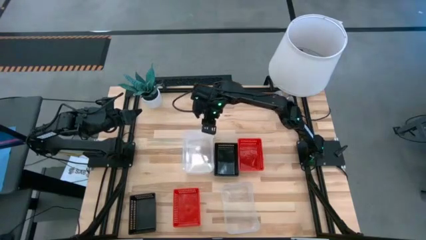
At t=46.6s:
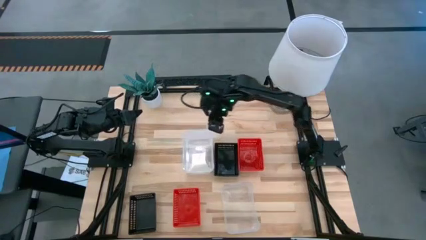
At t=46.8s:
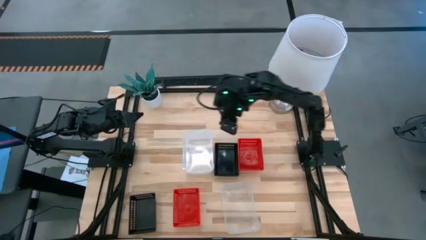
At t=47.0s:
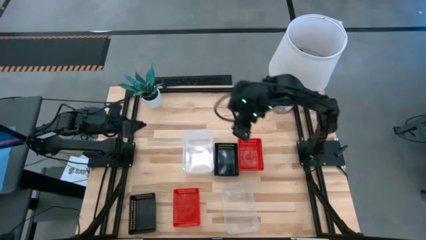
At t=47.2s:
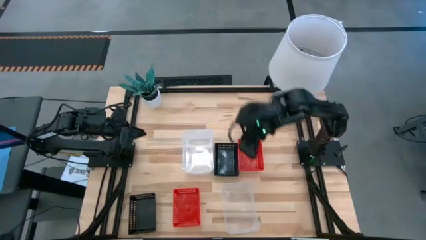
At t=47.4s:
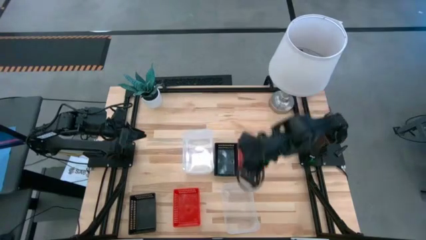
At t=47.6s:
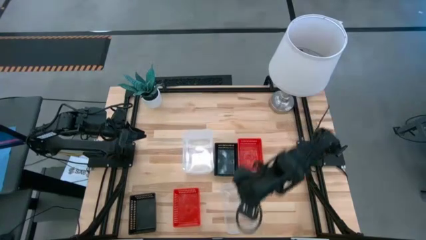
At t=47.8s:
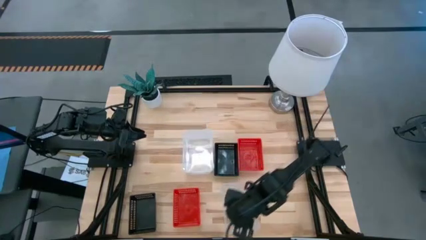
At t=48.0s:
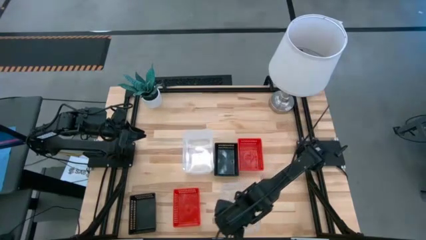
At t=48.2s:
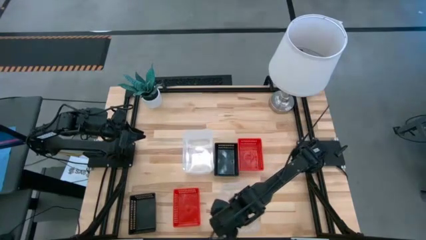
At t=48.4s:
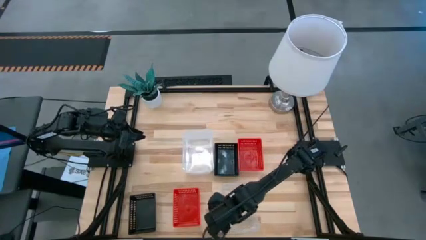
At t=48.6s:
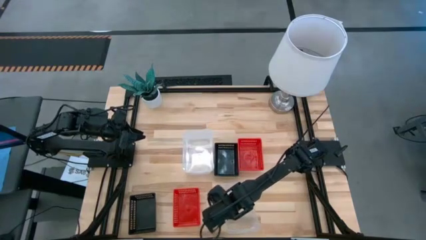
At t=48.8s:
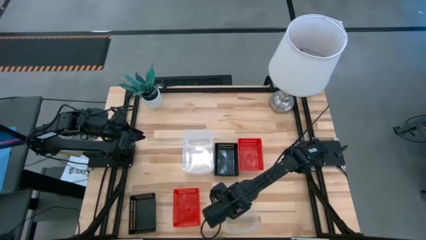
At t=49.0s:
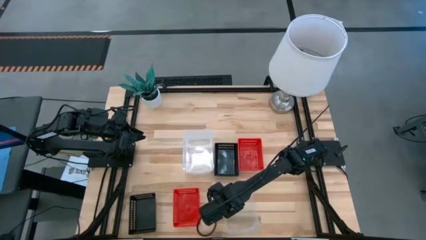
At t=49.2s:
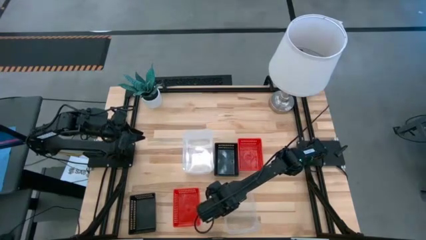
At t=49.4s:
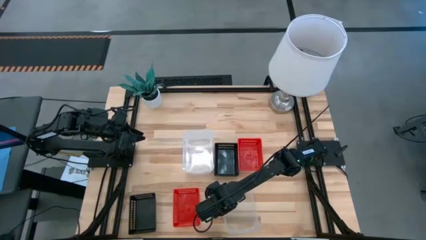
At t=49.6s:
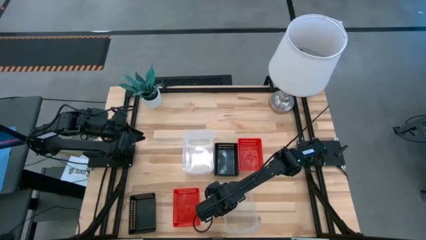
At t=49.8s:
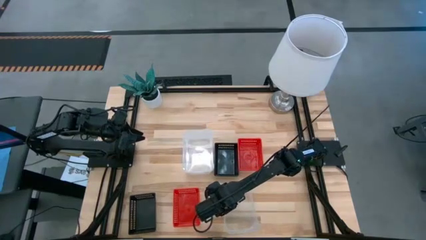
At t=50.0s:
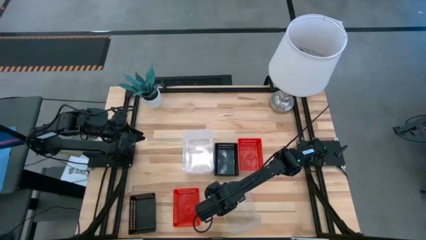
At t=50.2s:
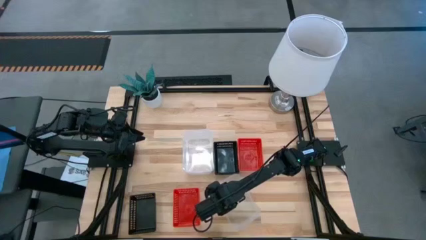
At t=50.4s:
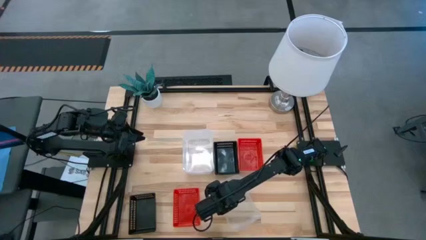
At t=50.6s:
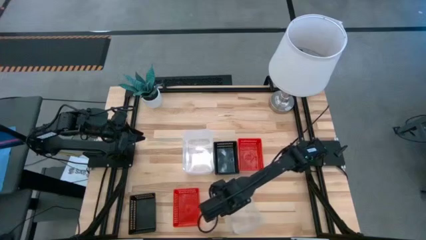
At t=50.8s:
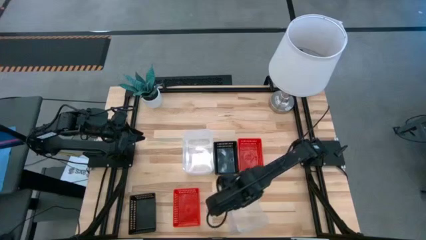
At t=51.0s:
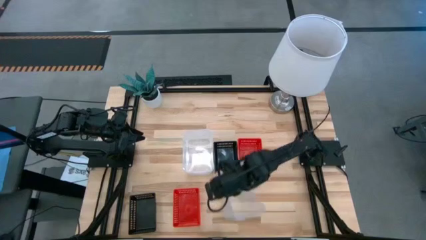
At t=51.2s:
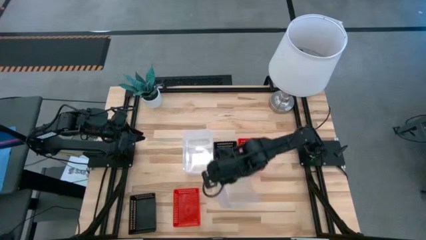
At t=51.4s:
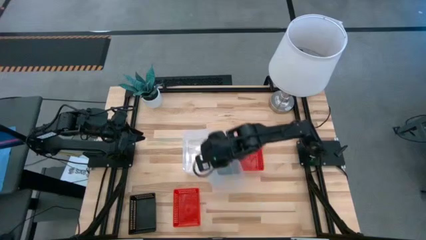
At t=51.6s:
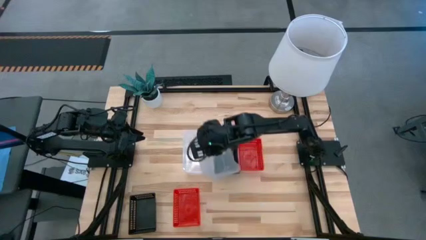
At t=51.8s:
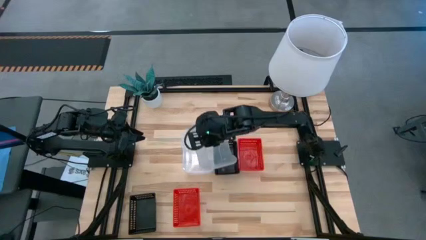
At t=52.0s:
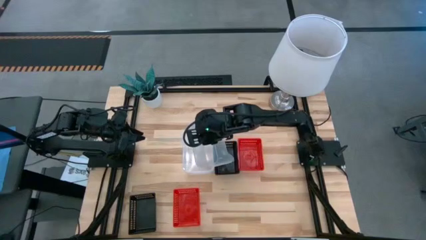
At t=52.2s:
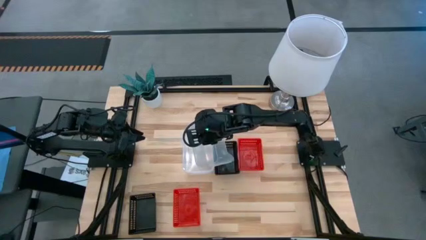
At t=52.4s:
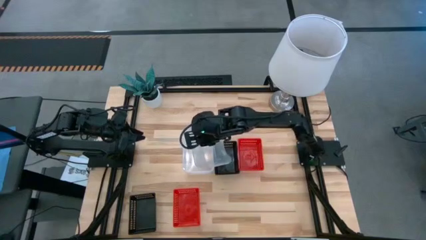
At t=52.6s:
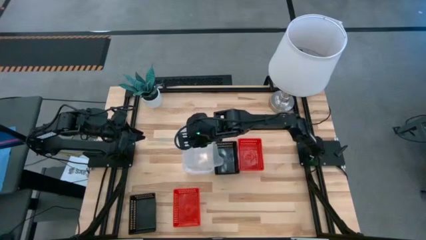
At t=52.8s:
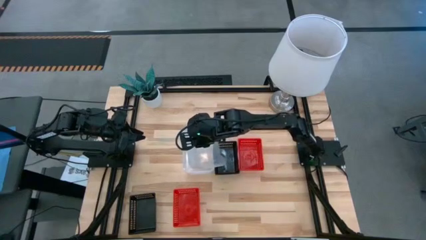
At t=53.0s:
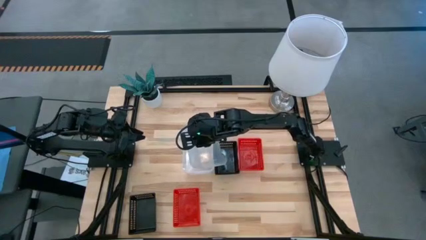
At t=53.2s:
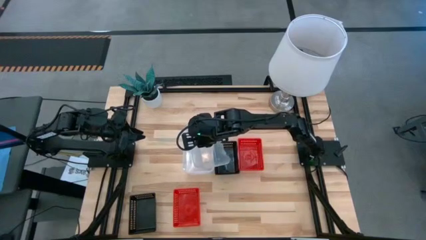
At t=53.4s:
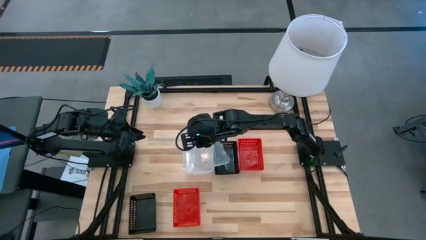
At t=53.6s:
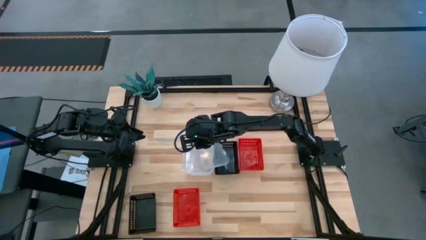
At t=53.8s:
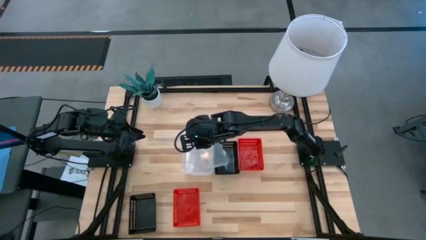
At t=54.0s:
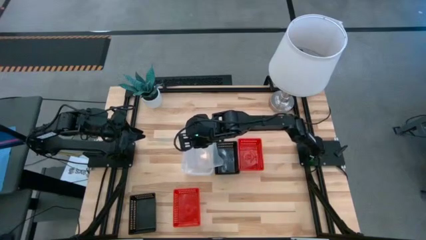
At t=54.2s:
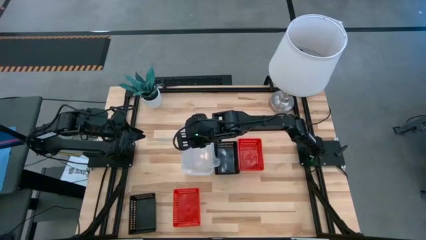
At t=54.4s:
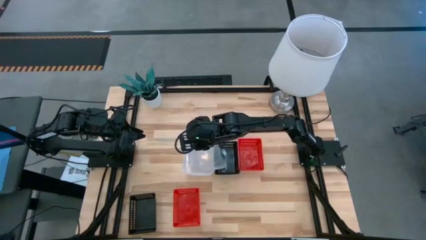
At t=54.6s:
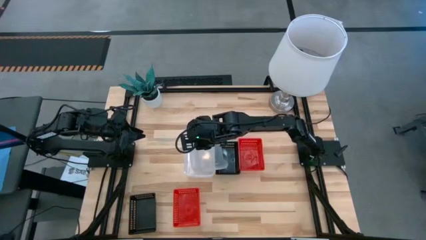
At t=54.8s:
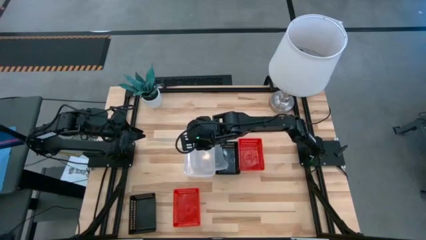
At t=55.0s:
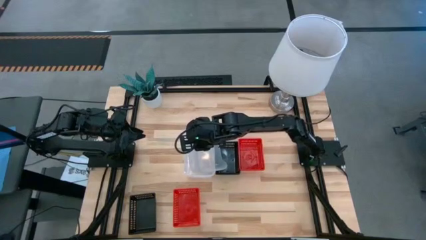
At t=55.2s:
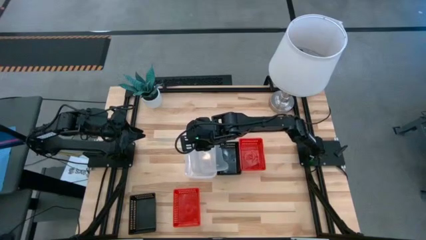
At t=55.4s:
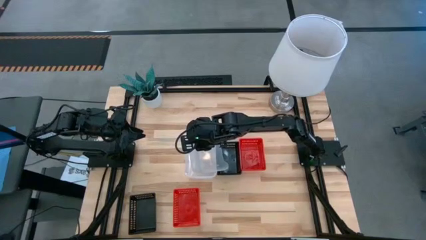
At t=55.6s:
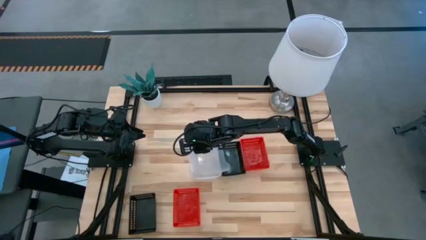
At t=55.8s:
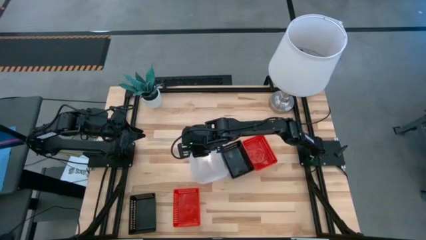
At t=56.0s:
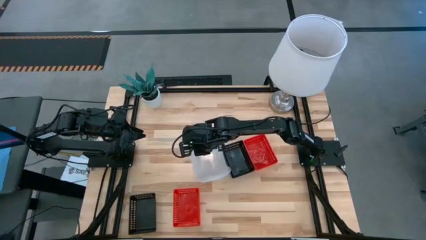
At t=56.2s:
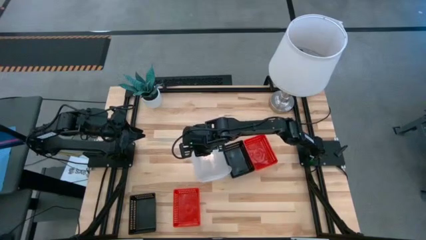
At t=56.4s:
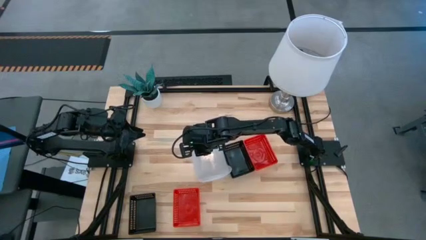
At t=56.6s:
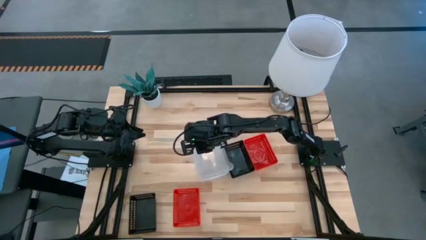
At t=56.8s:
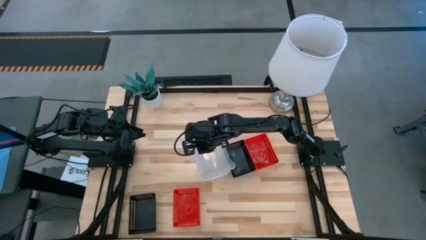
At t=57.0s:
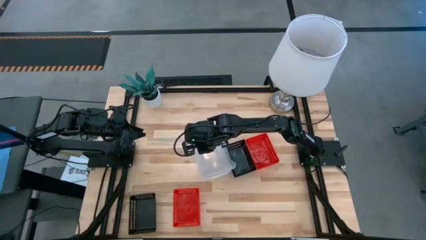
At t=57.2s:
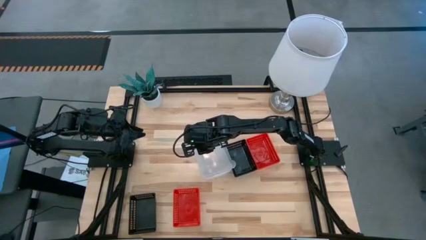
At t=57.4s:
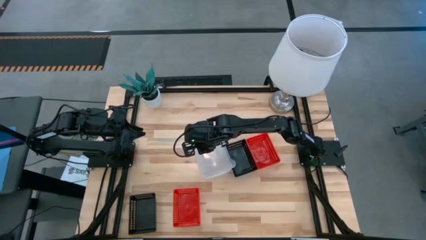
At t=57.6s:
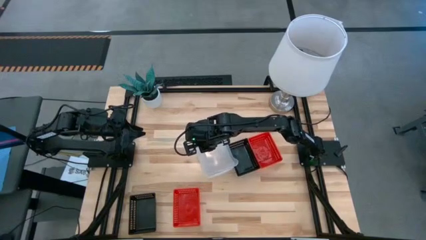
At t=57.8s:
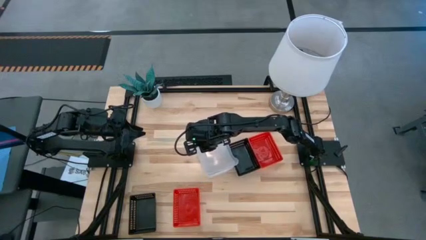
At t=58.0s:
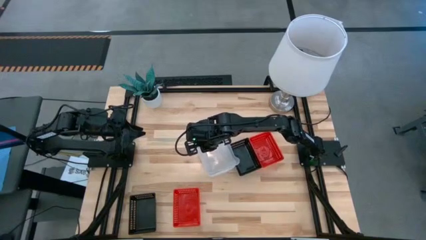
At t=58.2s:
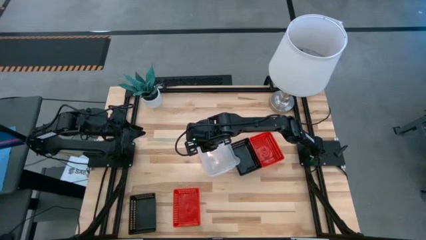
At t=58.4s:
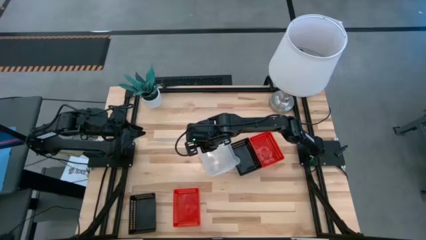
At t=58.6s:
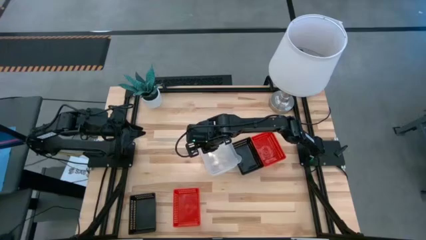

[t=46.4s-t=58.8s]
Stack the bottom transparent bin on the top transparent bins

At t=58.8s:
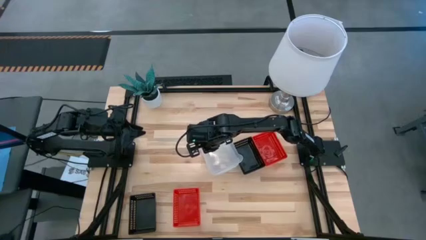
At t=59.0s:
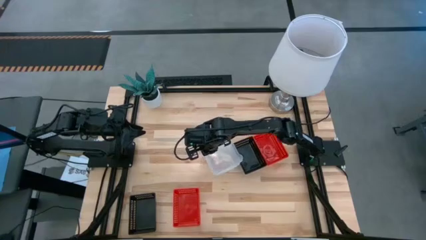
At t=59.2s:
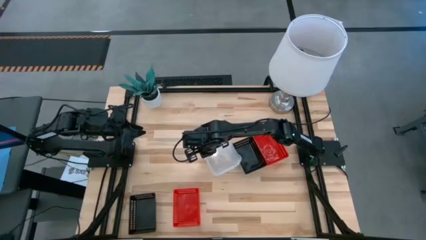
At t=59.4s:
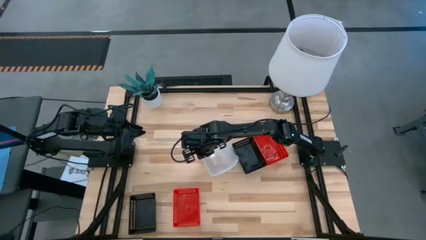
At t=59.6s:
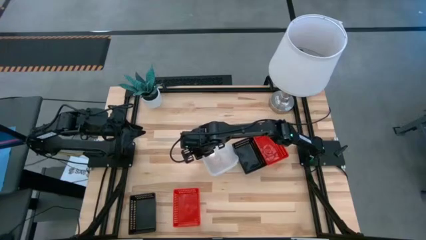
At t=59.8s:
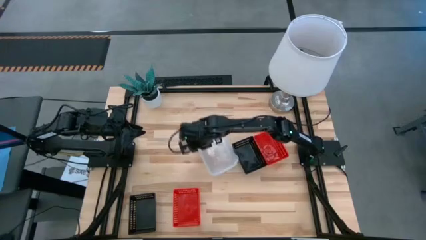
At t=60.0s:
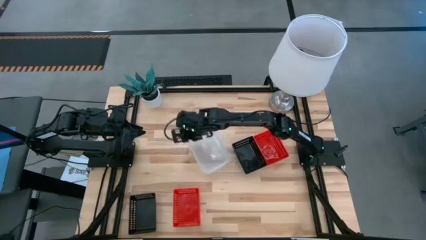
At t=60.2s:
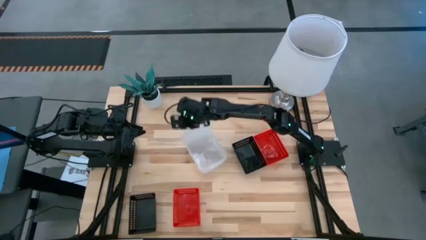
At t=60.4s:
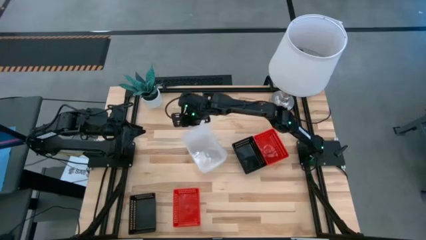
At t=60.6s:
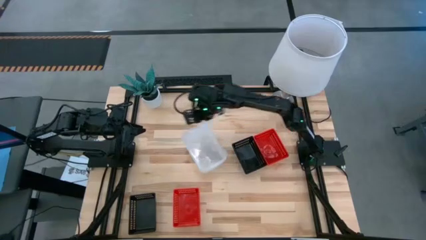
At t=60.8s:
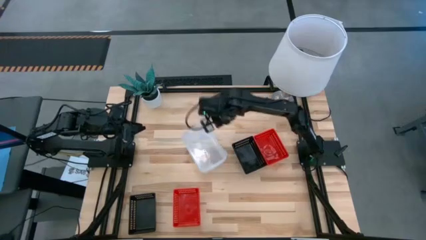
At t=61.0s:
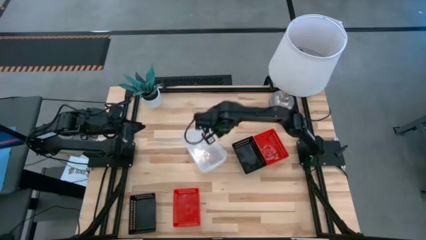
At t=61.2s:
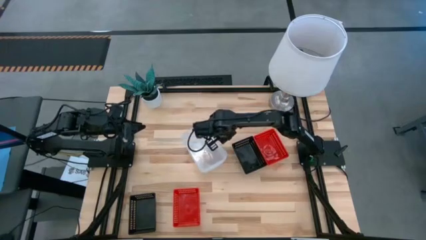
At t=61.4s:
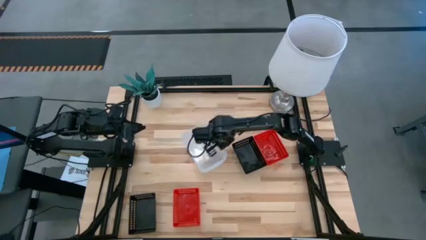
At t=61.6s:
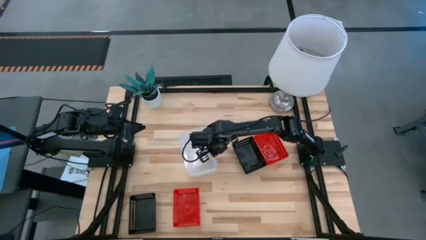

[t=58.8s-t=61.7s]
Adjust the stacked transparent bins

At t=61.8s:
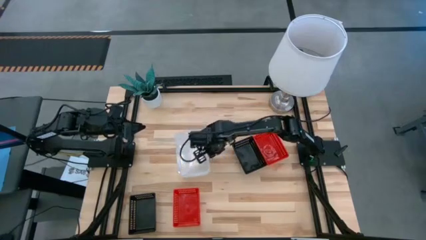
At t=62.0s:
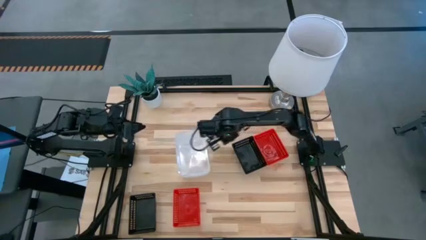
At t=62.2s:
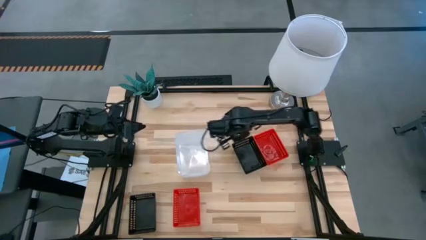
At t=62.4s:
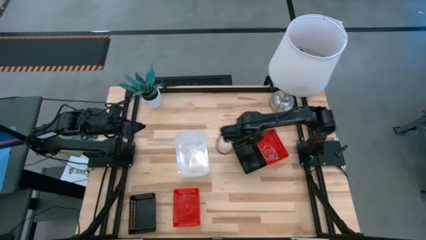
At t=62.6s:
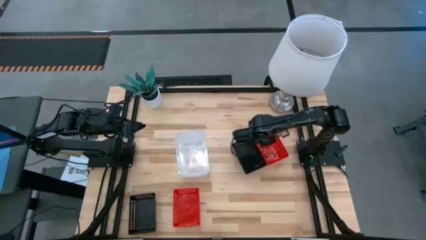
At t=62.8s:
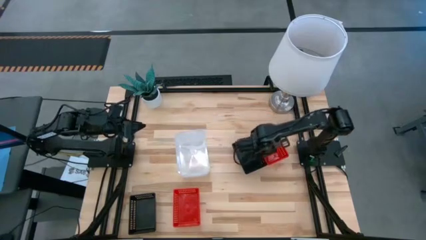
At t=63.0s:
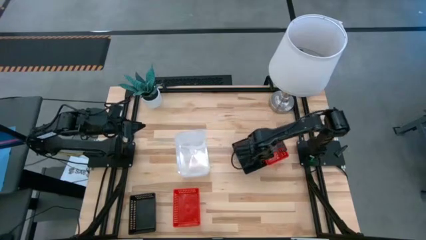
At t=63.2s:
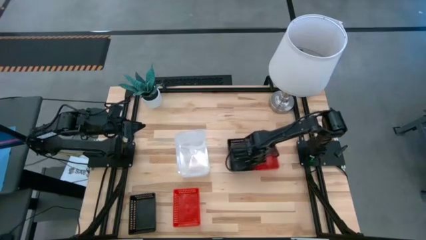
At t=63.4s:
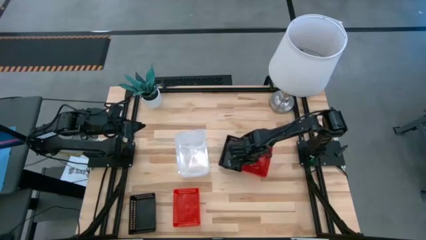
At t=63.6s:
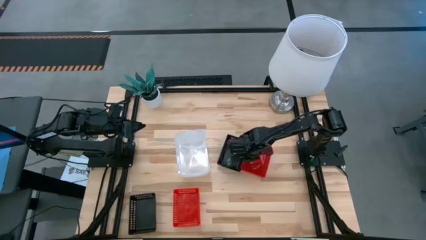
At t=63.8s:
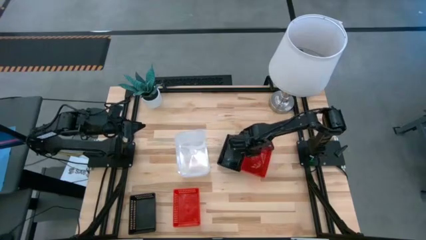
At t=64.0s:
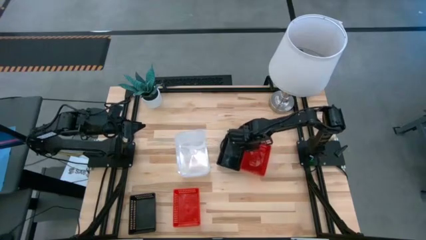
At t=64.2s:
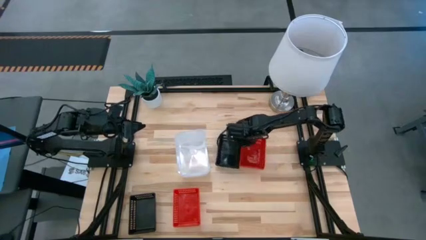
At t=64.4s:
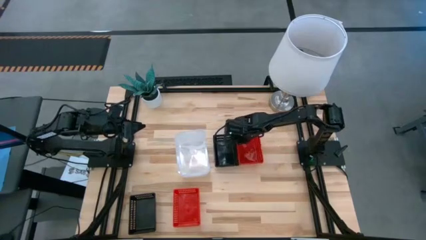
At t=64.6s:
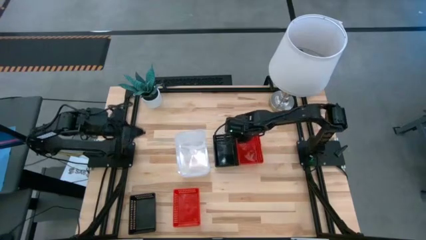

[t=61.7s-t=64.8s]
Adjust the stacked red bins
